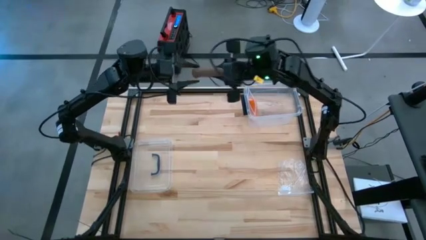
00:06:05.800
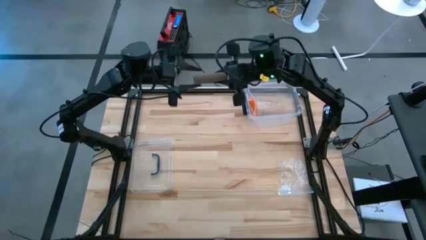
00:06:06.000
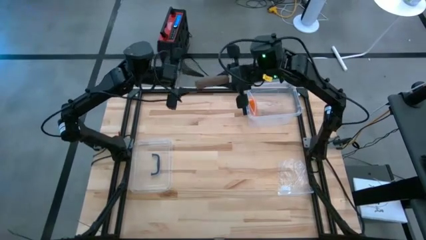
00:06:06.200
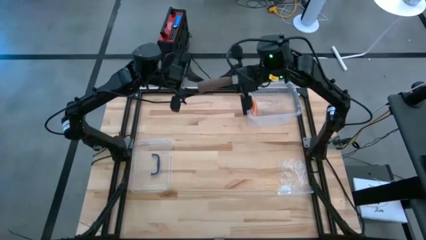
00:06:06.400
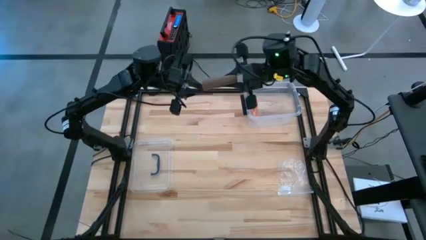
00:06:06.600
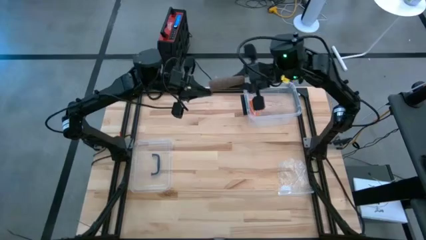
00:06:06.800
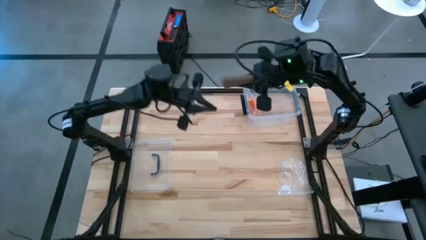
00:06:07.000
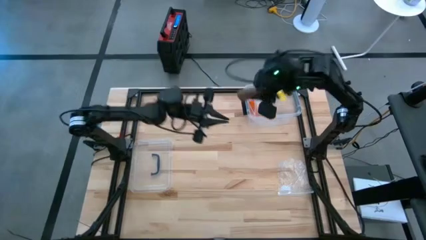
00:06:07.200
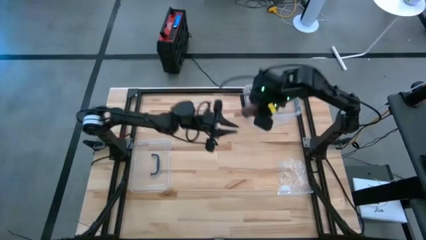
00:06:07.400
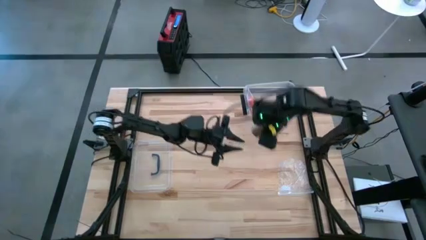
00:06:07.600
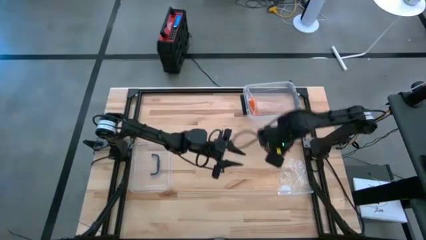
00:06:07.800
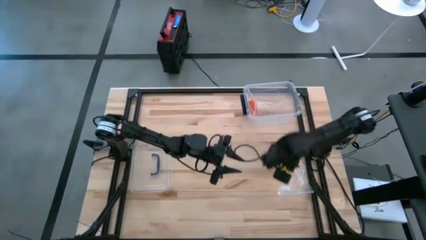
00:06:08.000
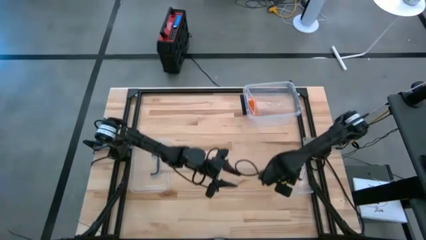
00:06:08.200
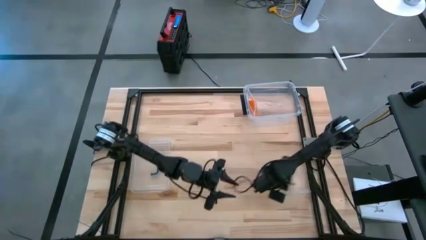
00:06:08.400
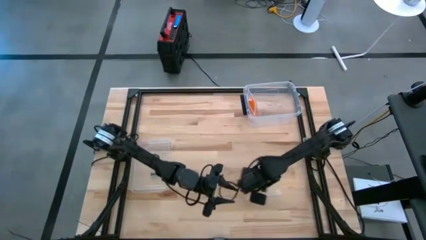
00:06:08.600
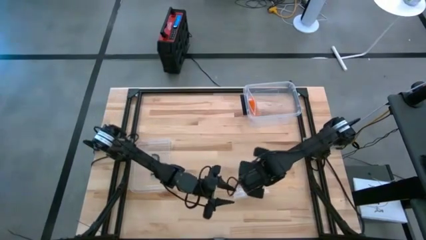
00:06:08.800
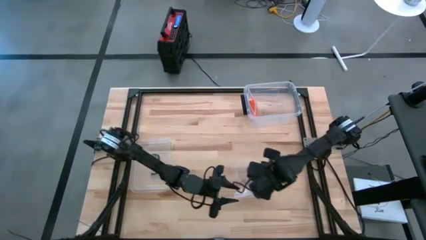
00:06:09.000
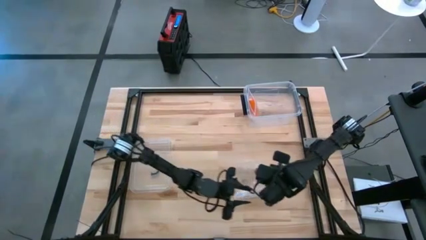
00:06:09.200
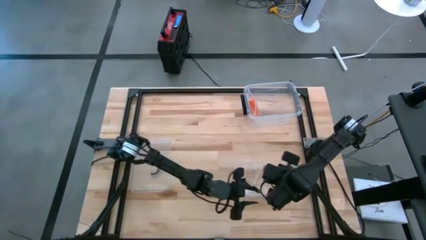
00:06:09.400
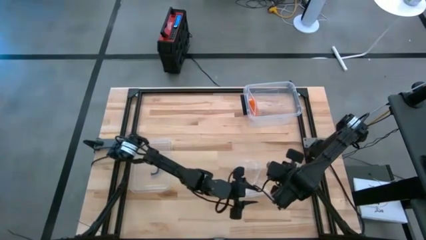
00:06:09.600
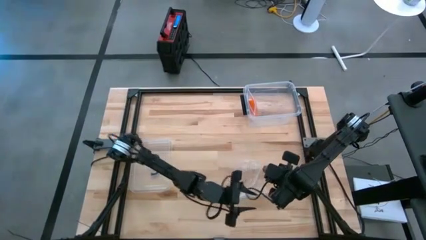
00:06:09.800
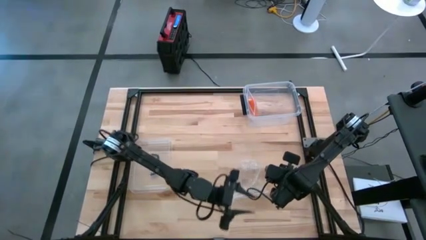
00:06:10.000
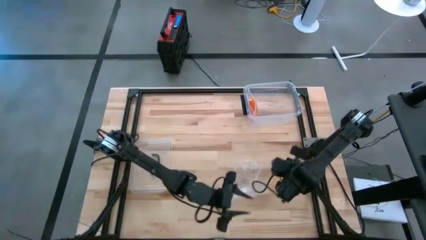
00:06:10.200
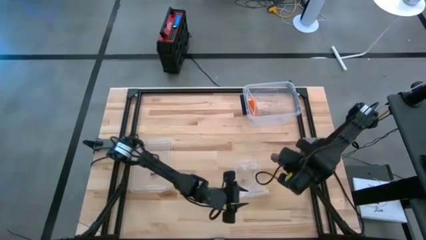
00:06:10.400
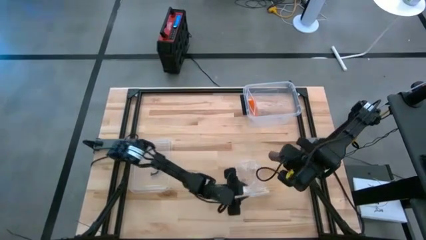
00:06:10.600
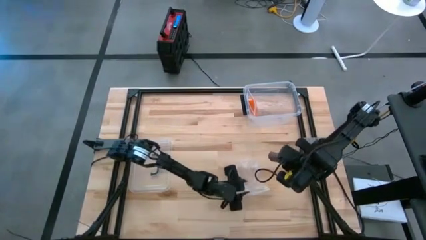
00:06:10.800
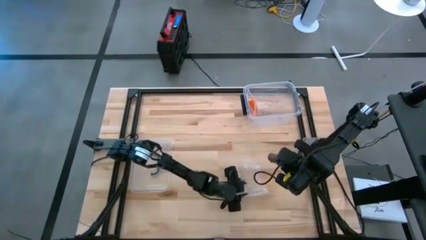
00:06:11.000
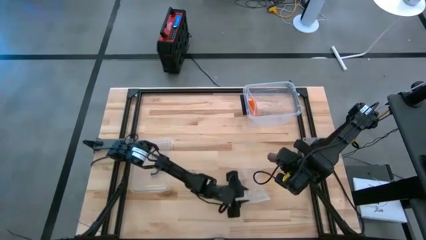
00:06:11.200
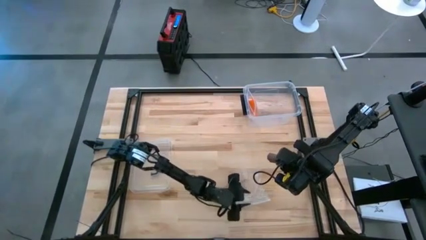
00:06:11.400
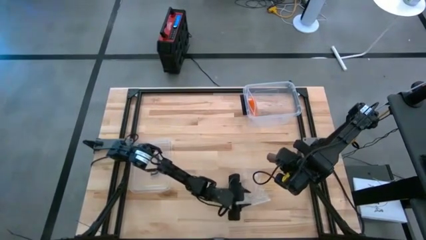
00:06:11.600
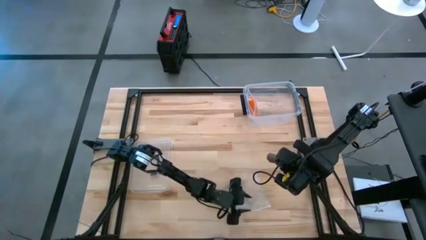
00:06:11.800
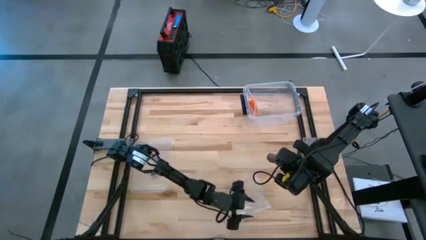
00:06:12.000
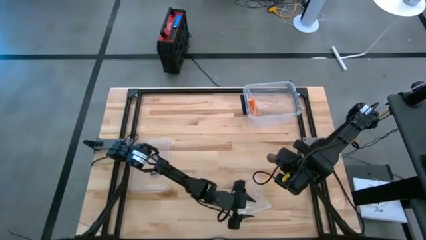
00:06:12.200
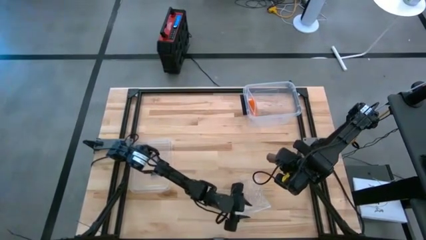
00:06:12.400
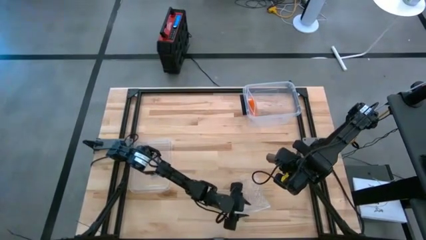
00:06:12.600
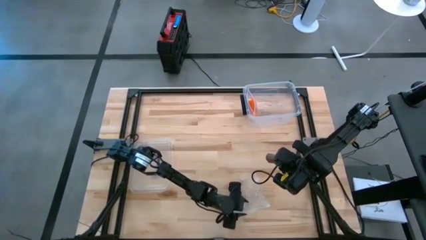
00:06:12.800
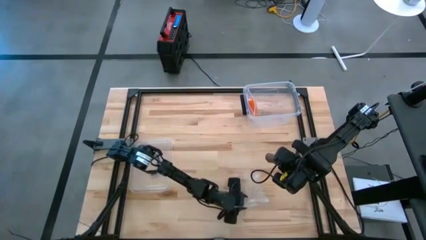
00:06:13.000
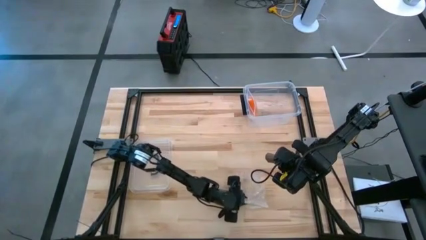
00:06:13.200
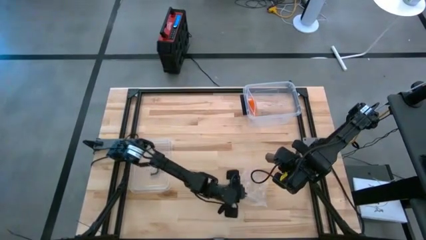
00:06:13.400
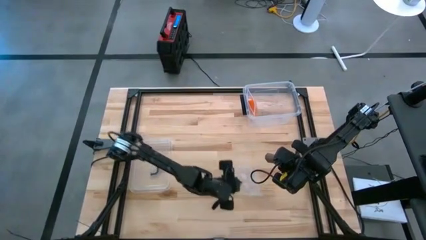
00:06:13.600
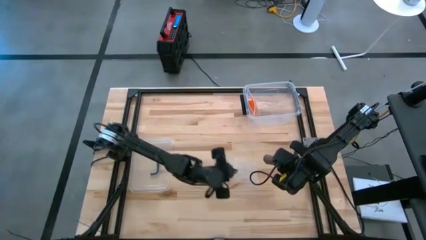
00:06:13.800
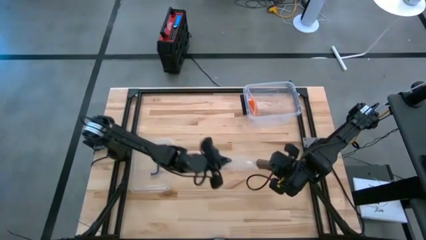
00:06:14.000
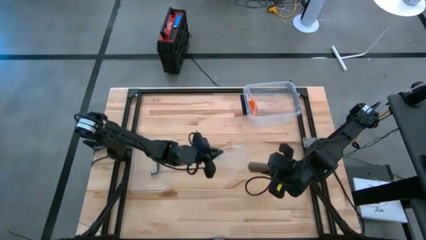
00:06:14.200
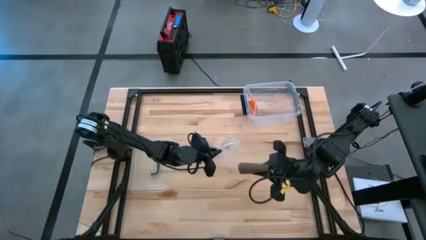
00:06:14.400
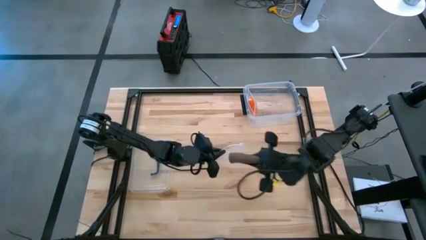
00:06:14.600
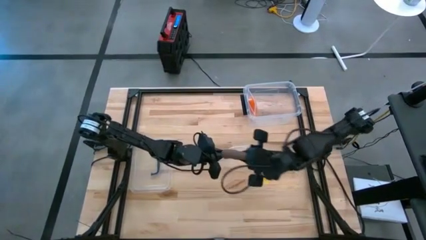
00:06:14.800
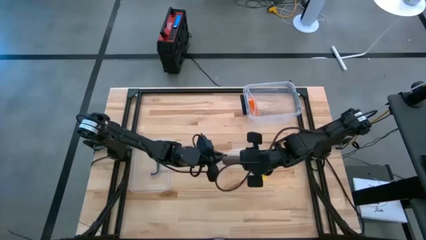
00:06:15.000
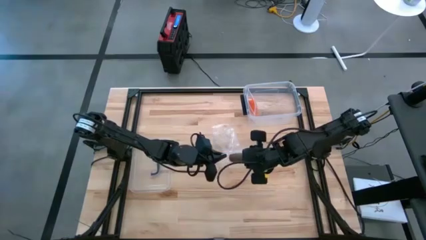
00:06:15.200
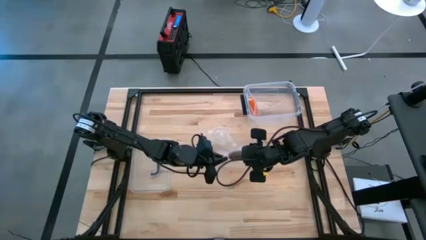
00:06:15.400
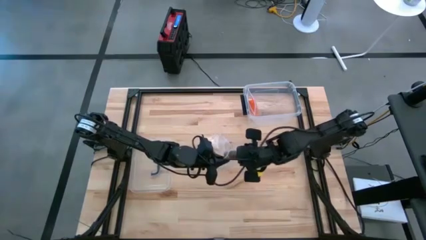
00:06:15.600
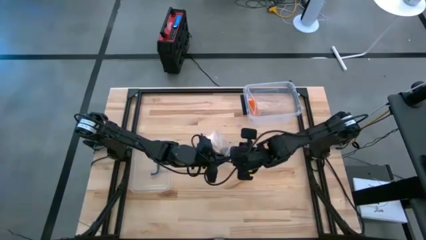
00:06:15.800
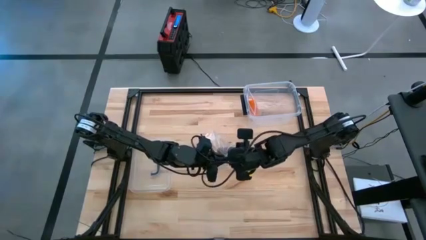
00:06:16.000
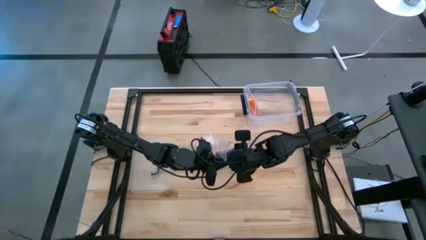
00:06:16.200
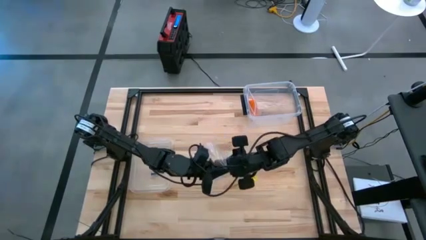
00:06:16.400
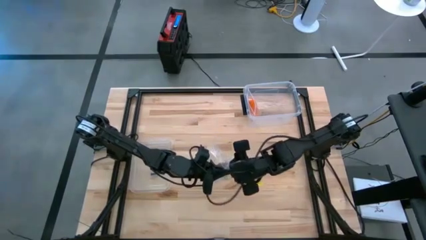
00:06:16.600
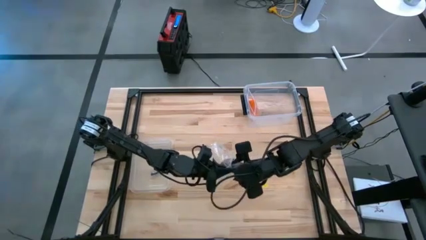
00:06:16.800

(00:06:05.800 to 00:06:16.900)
Task: Roll bandage
Put the rolled brown bandage into the transparent zip bag

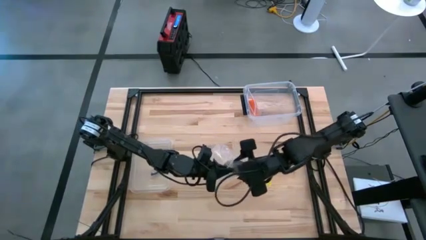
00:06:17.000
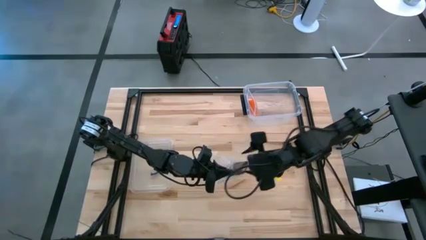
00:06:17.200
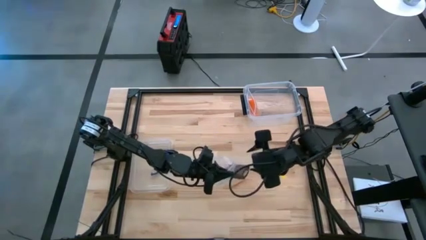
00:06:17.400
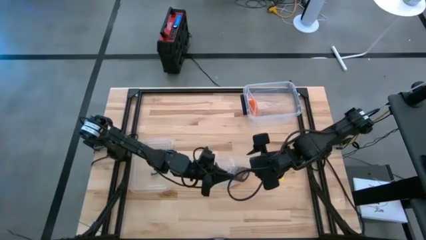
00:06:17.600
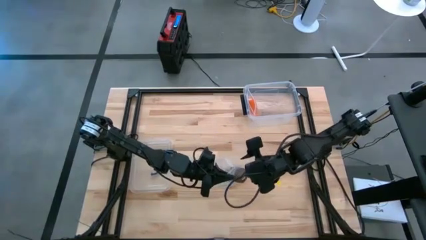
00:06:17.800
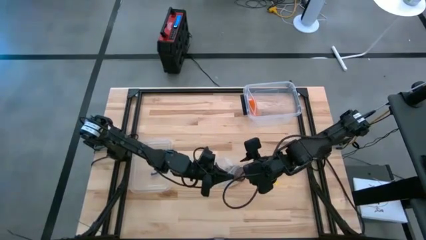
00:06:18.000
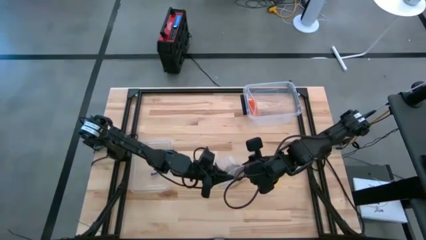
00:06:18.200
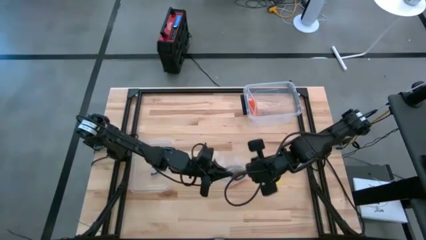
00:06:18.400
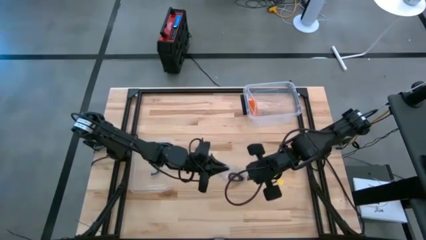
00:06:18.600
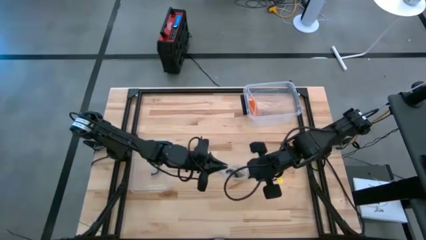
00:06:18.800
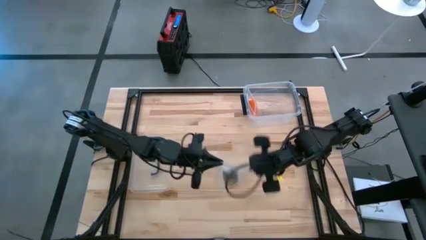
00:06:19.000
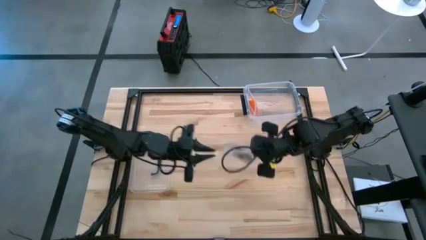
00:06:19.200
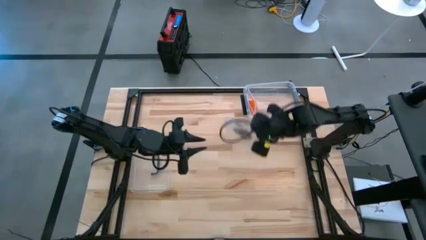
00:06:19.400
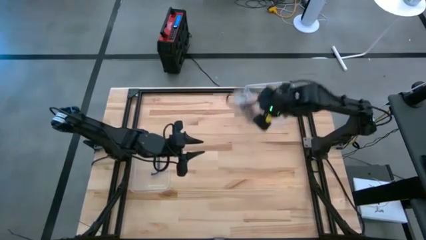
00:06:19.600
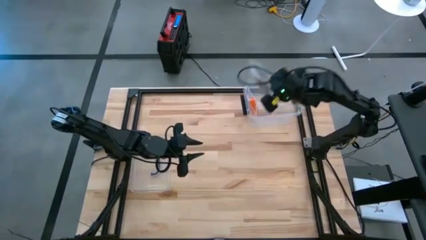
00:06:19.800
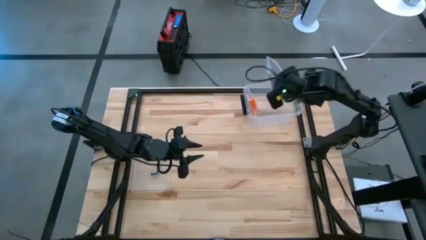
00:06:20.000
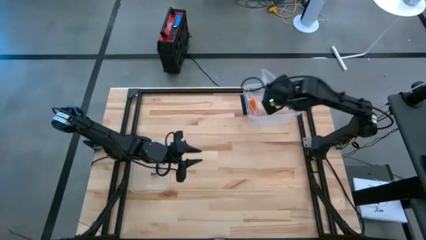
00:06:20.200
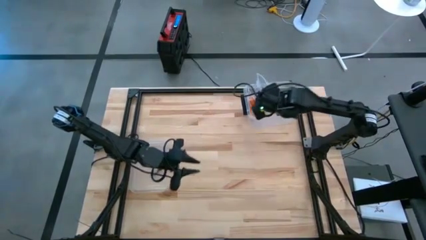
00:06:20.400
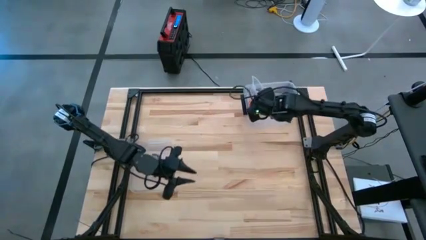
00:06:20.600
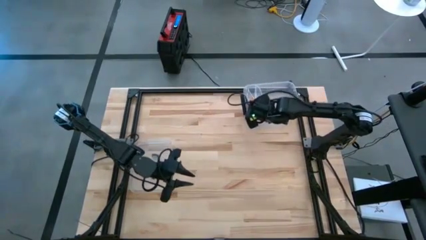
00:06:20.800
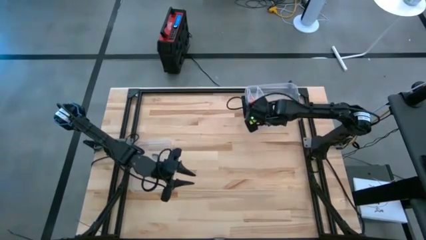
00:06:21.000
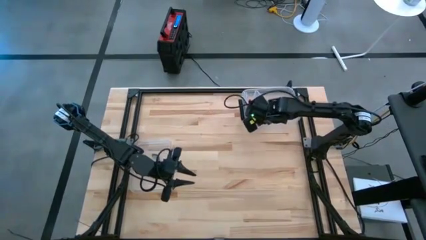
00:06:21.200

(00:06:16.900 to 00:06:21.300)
Put the packed rolled brown bandage into the transparent container
